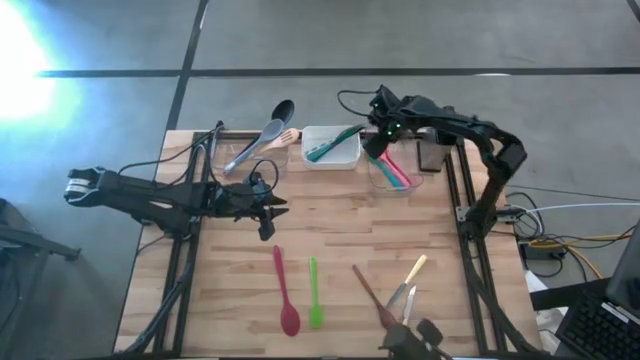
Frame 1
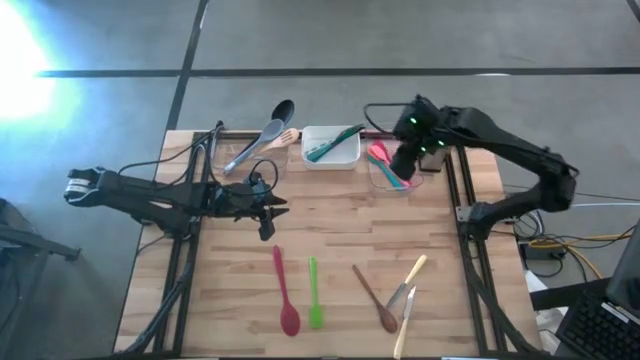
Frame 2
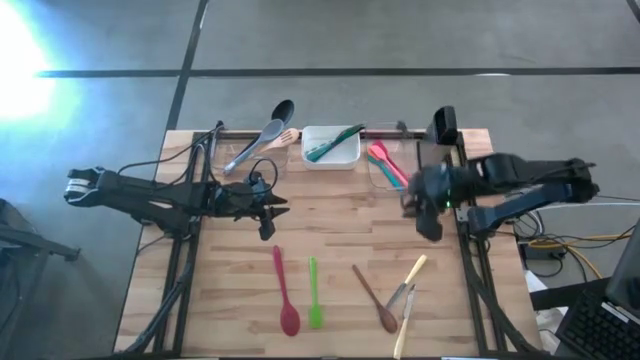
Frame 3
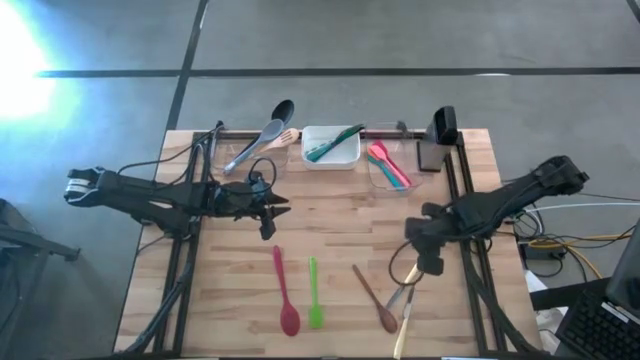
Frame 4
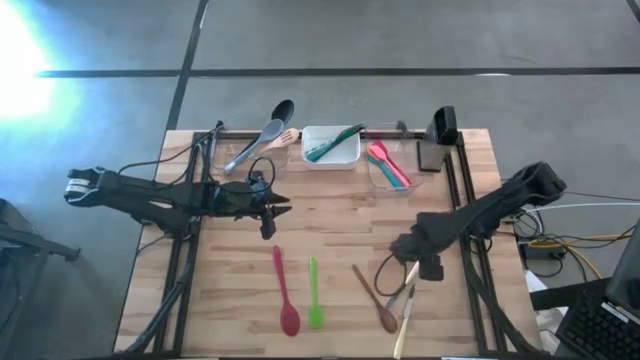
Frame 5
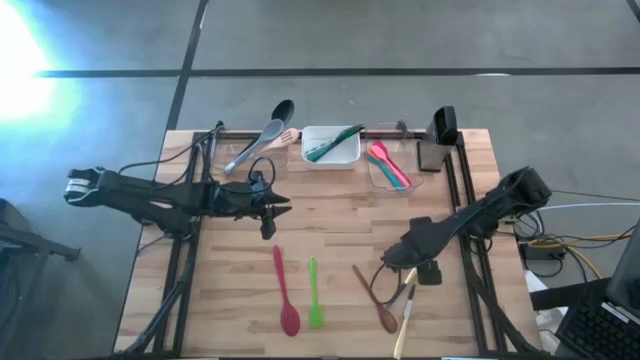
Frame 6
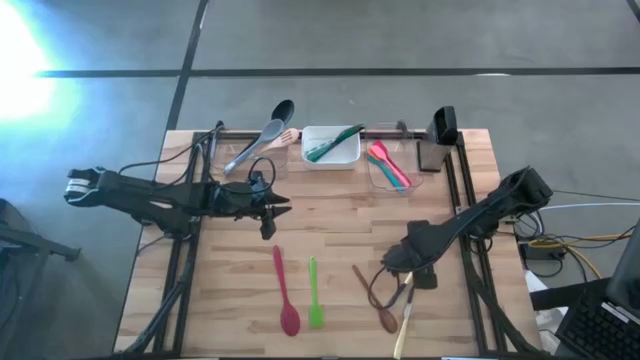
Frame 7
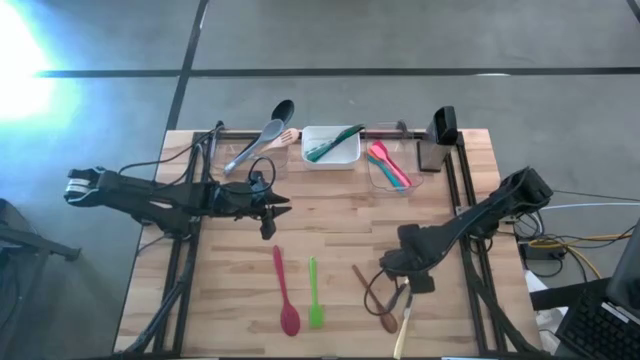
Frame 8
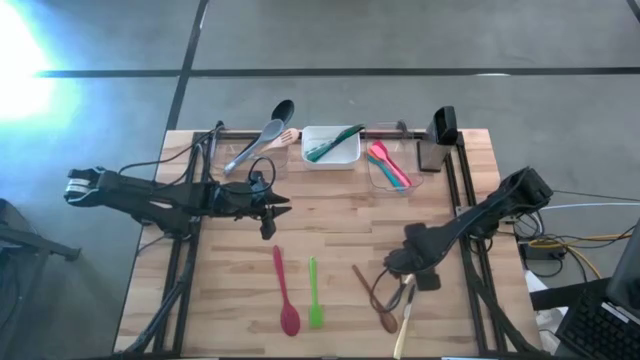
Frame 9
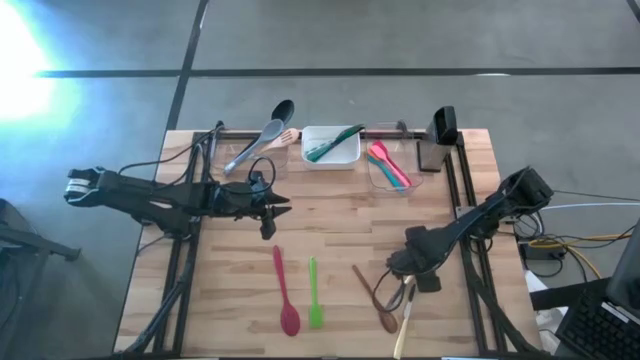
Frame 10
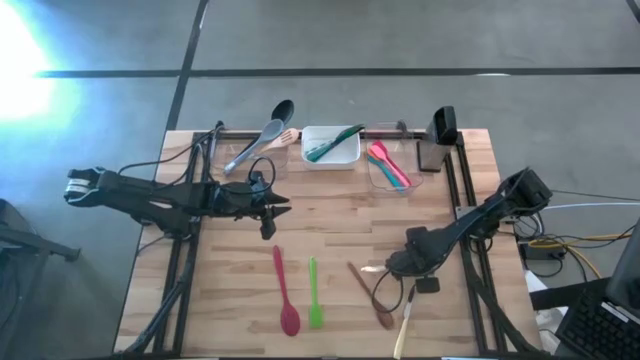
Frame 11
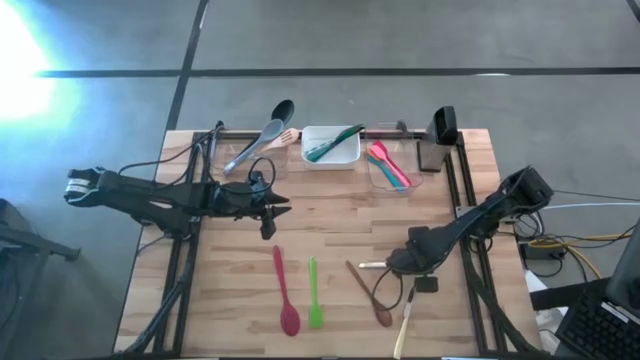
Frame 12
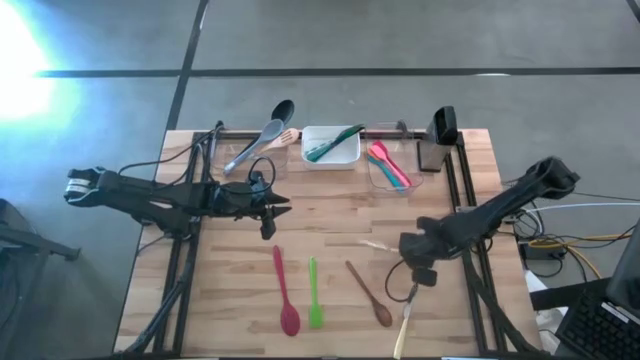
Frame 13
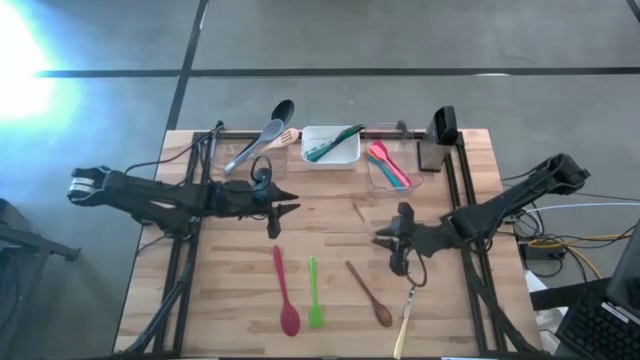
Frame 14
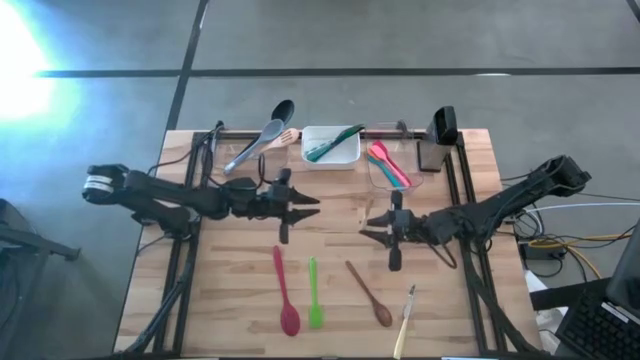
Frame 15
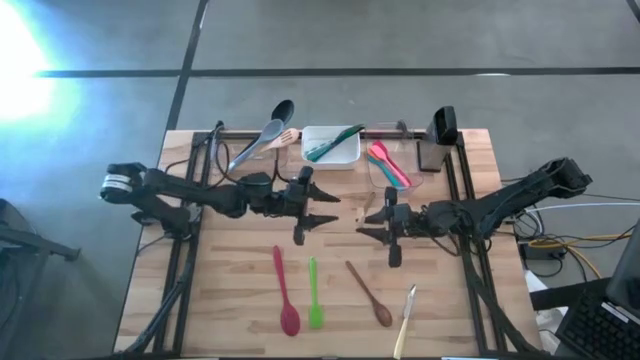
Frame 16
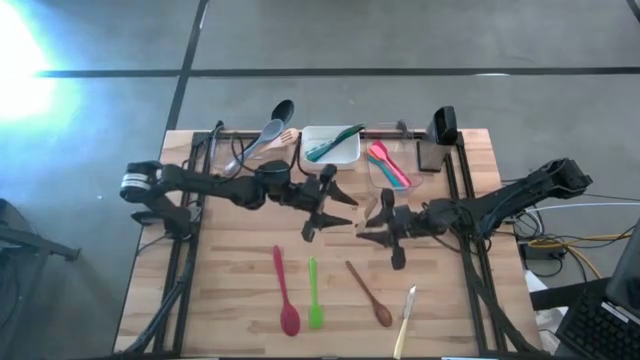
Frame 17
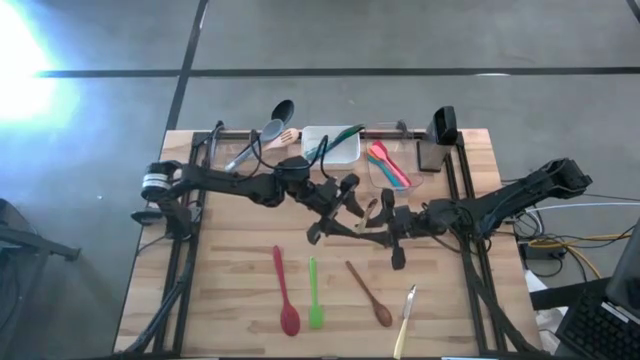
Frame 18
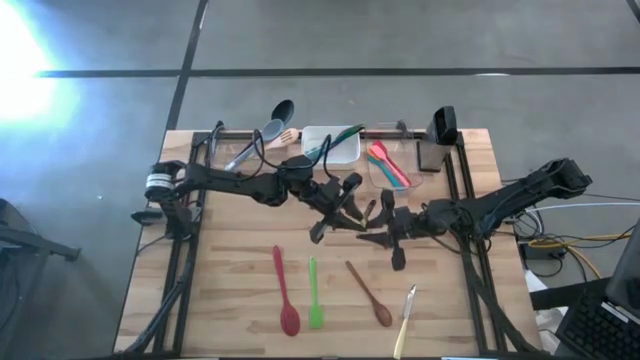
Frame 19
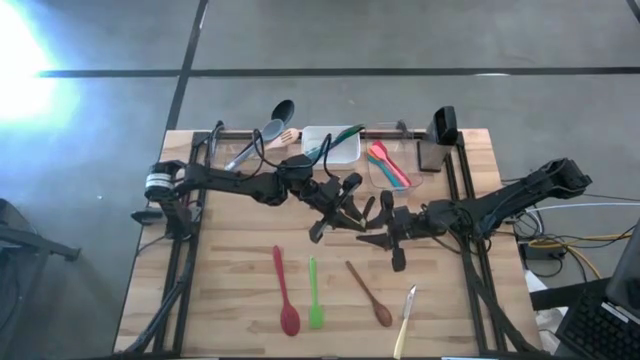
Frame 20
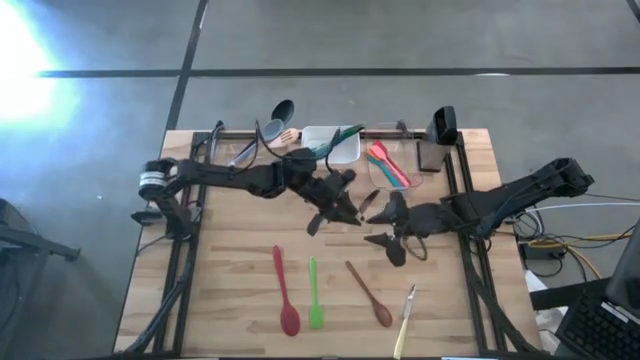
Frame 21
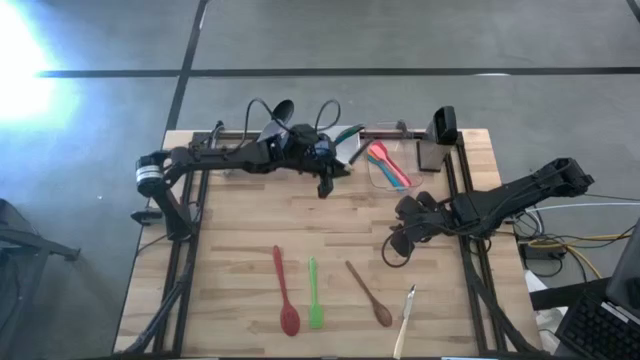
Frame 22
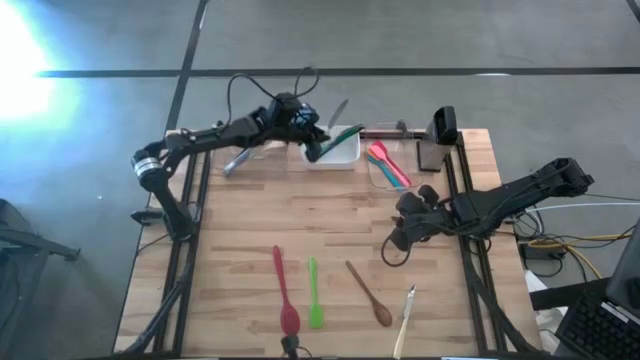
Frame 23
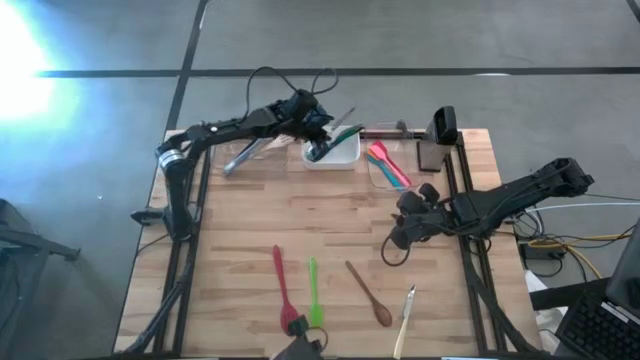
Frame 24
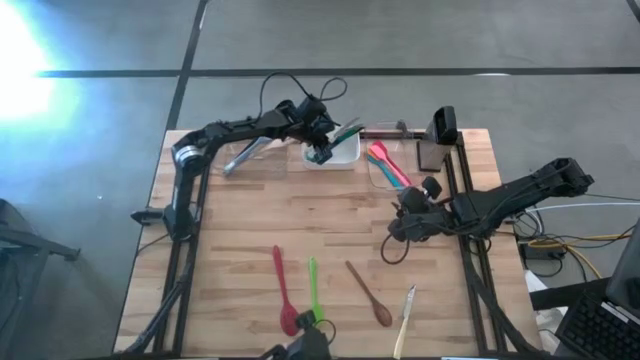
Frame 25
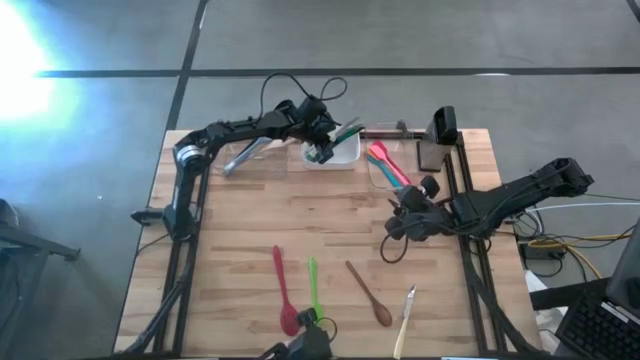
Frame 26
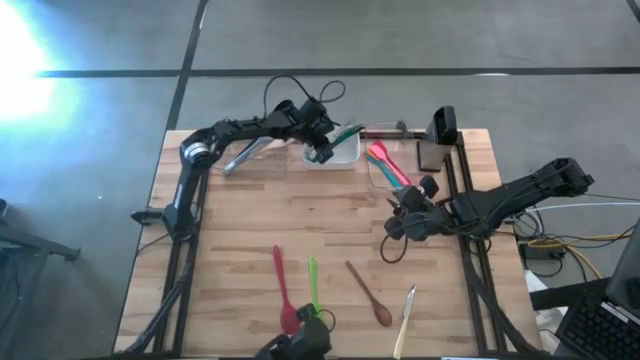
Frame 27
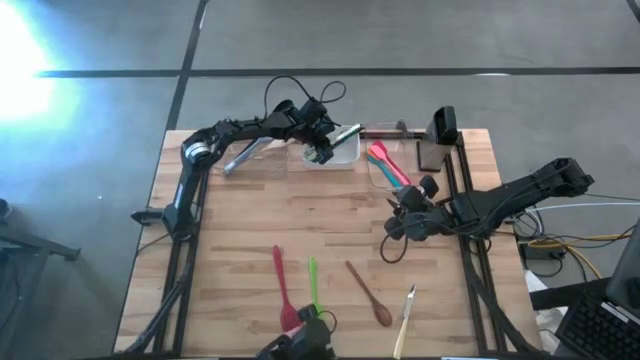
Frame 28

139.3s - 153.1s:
Task: Pick & Place Kitchen Items
Put the top yellow table knife into the white bin

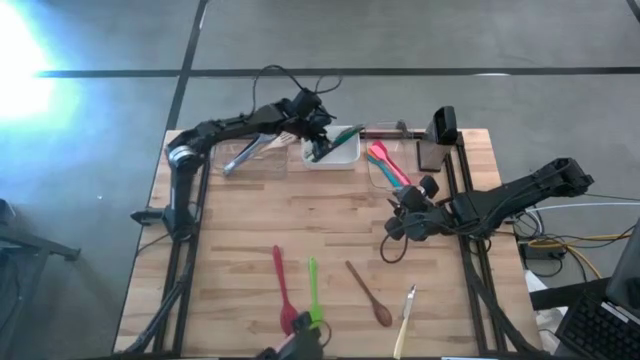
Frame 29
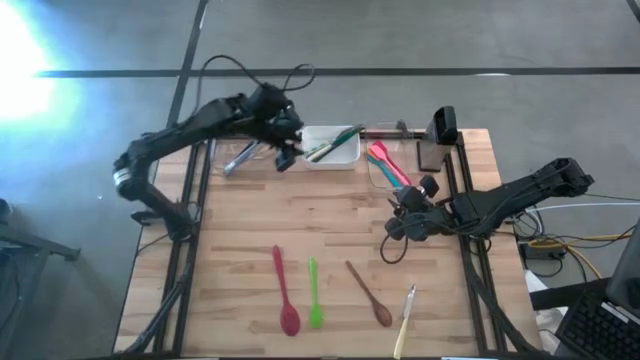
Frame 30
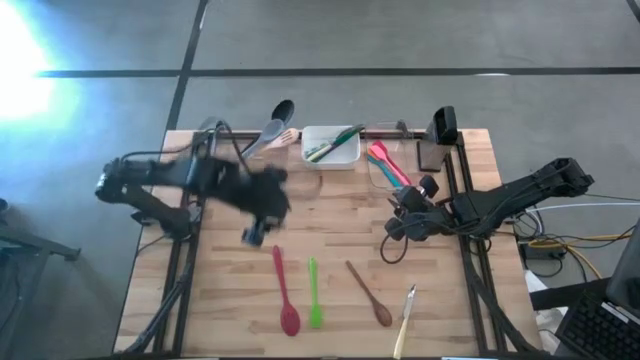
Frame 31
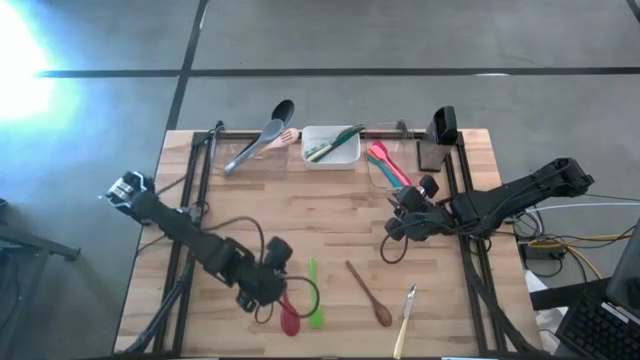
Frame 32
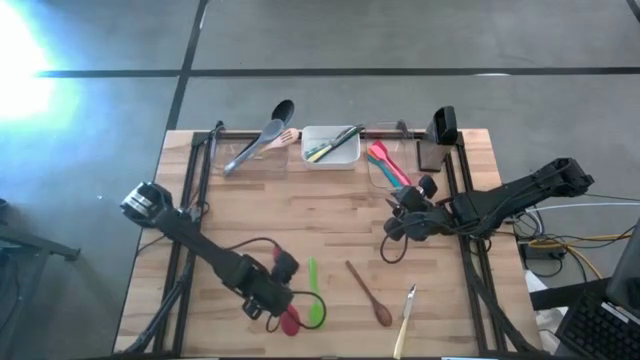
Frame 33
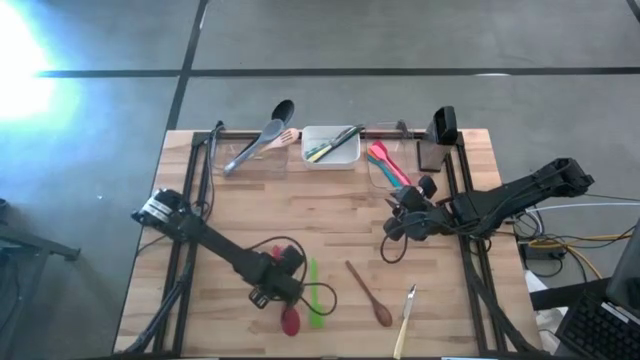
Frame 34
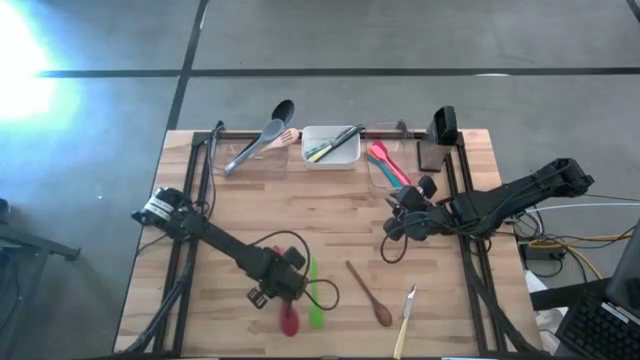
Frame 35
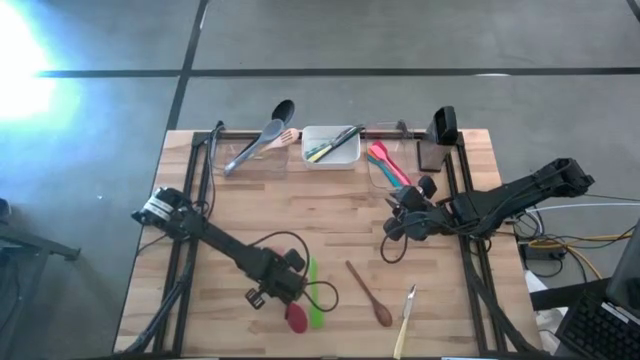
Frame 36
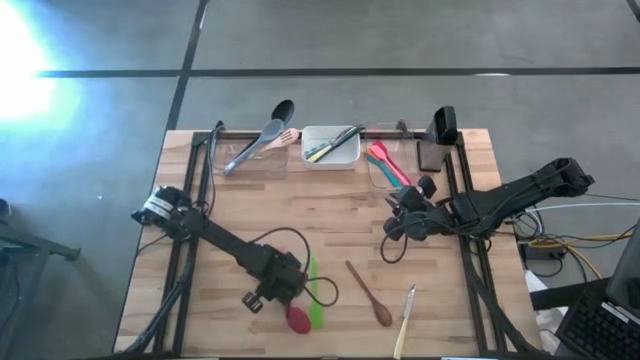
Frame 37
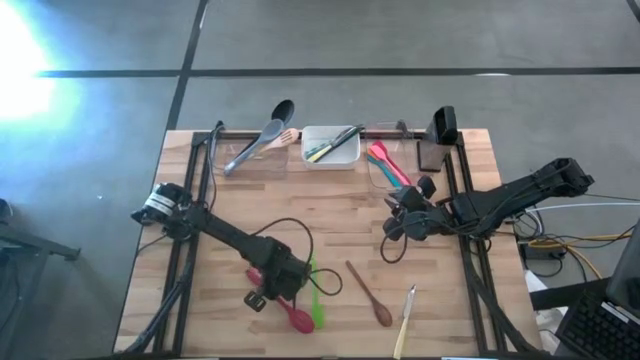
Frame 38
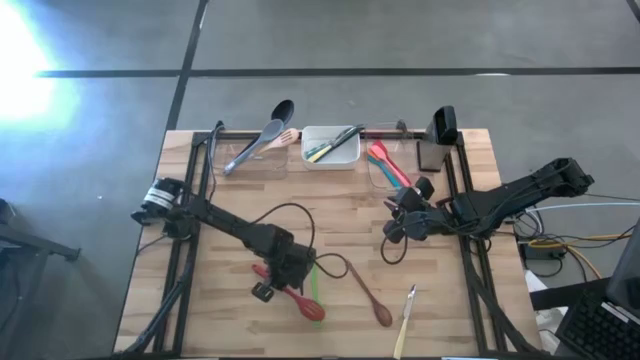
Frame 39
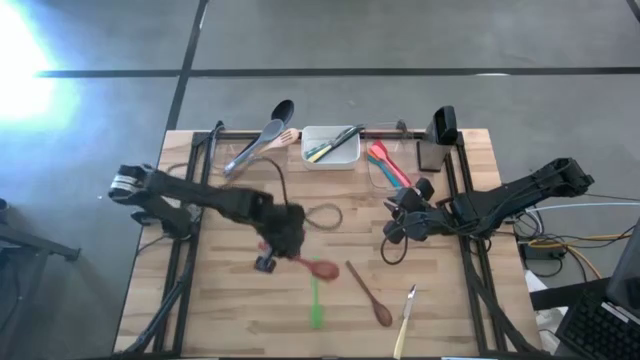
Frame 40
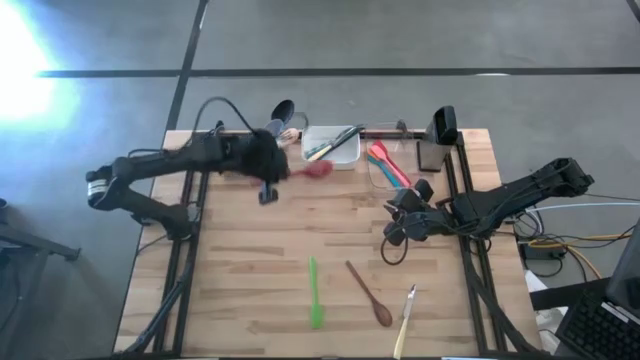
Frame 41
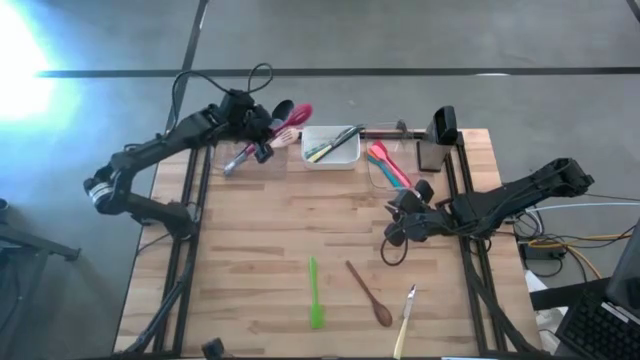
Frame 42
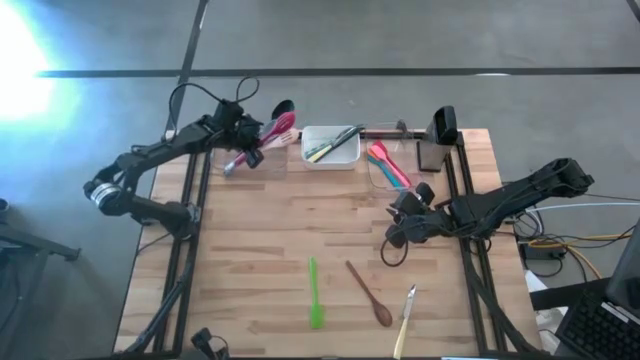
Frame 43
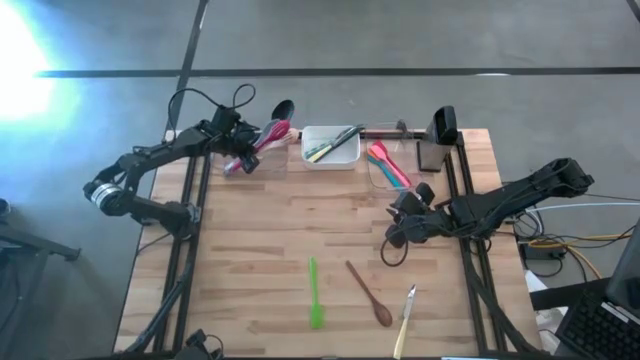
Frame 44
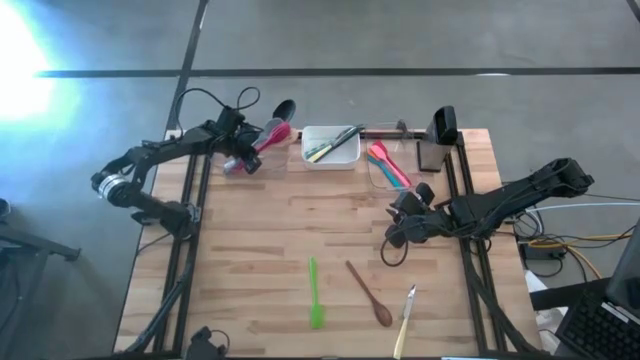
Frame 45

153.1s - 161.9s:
Put the red serving spoon into the left transparent bin
